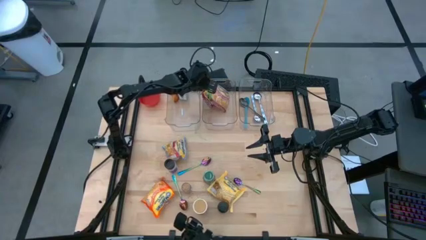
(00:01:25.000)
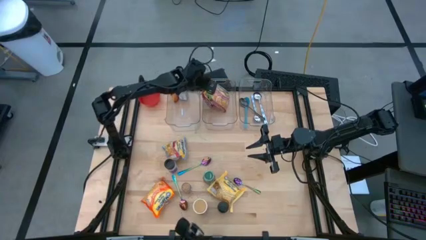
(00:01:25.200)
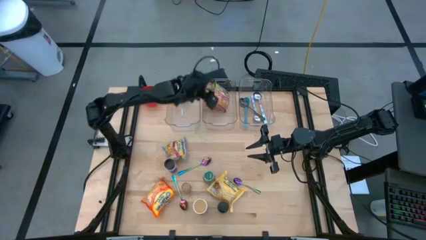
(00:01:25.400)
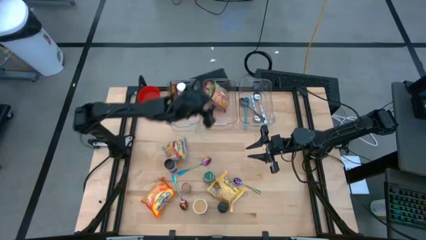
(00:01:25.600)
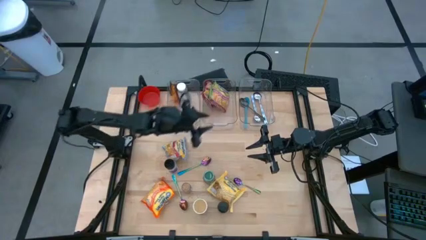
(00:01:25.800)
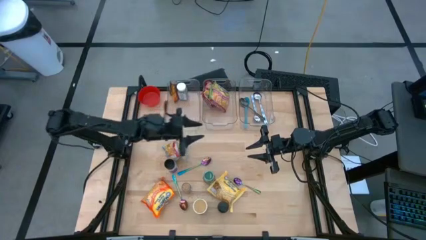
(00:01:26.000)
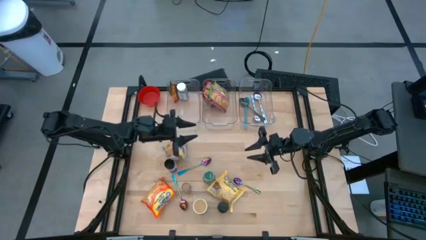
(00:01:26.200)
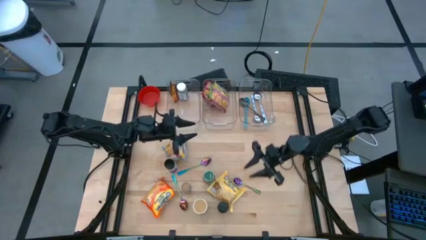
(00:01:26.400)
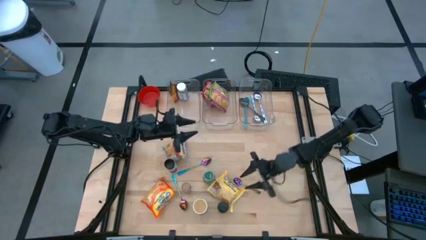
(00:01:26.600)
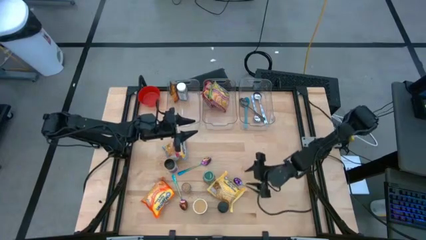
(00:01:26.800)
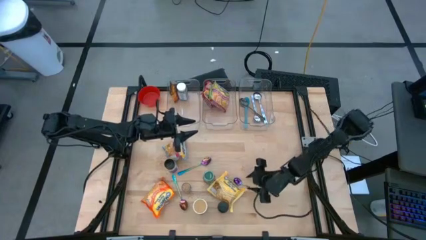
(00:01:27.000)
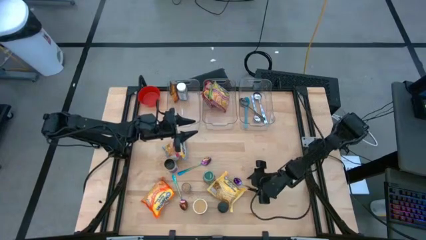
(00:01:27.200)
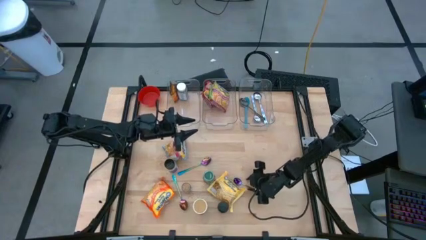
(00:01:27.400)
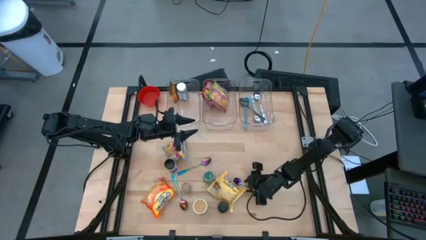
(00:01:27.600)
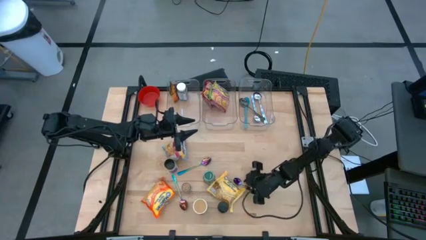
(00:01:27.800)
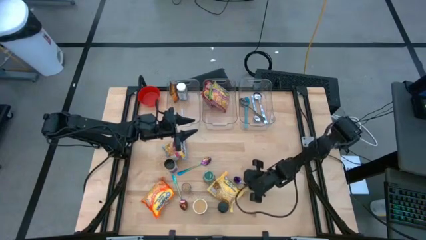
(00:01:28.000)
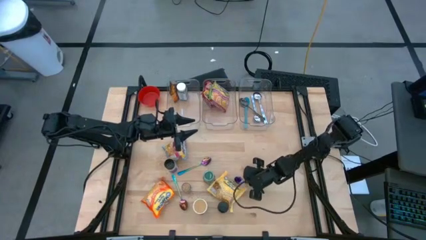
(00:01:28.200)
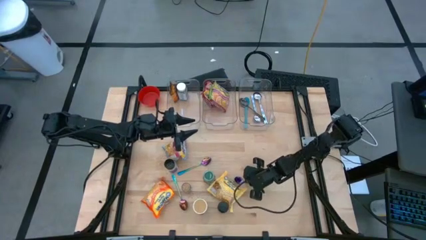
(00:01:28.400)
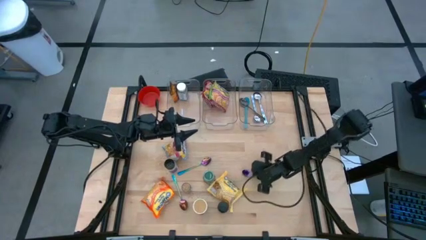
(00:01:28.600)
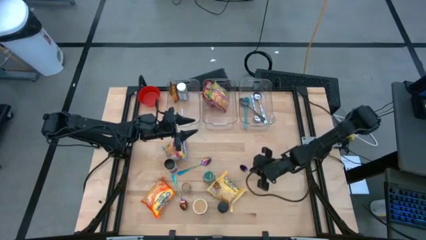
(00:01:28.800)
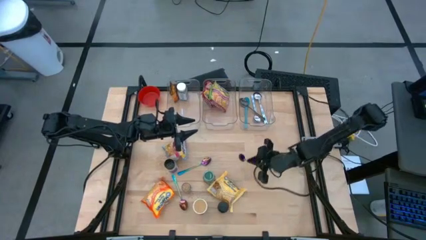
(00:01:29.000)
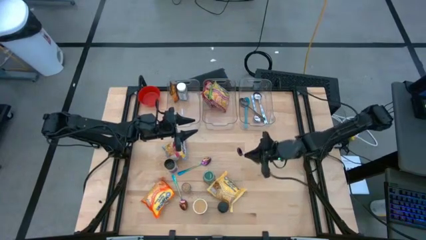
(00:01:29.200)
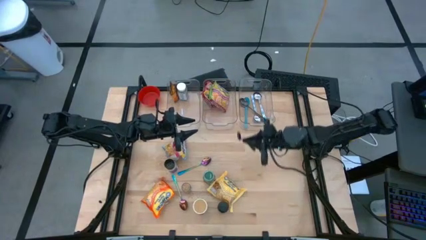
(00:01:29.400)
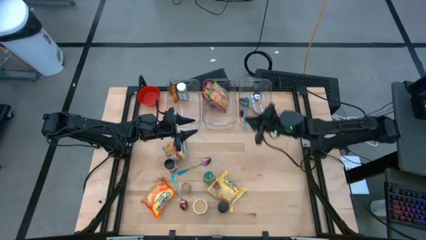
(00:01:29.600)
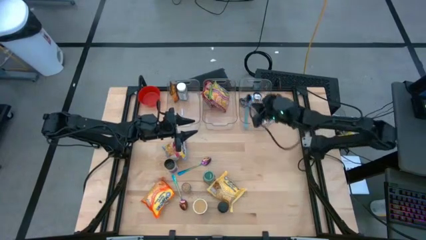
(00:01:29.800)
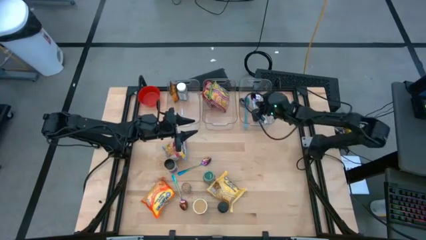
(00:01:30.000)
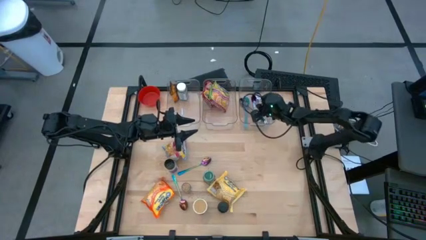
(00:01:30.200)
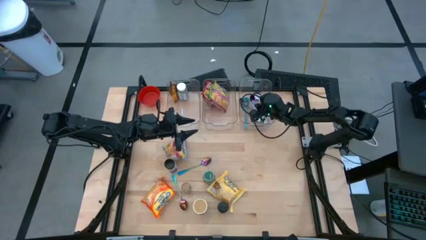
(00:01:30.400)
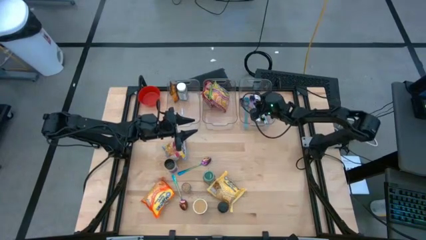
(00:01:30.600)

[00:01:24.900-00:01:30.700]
Task: Pick & Place Food Item
Put the right blue spoon into the right transparent bin

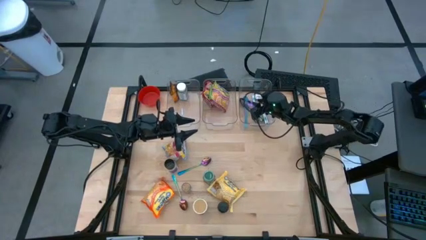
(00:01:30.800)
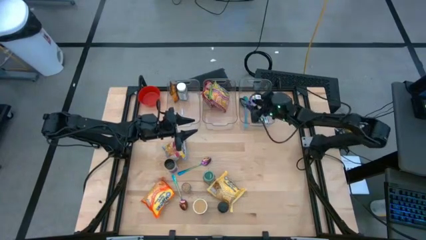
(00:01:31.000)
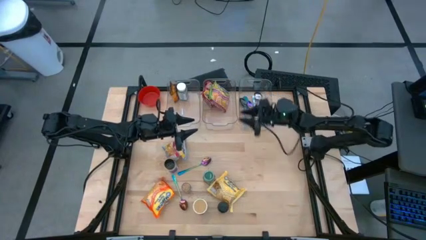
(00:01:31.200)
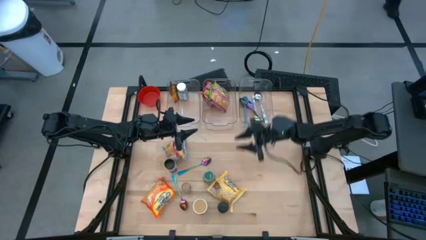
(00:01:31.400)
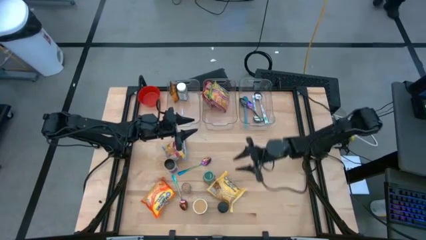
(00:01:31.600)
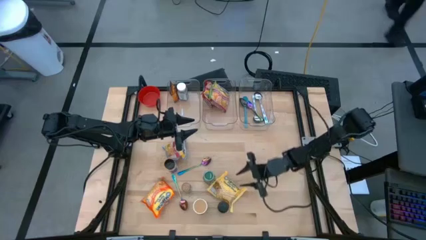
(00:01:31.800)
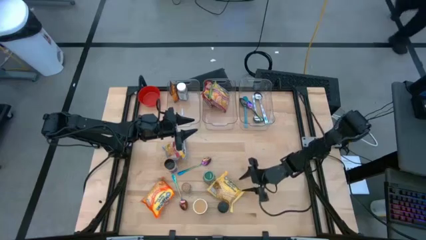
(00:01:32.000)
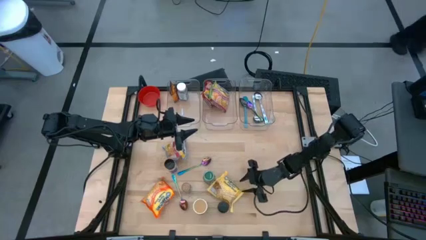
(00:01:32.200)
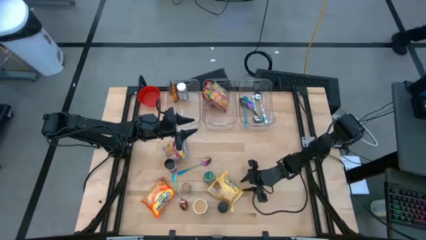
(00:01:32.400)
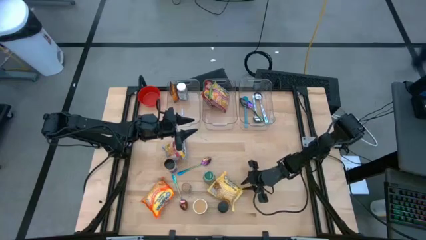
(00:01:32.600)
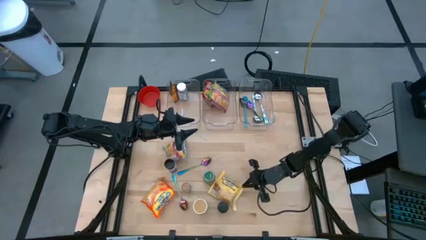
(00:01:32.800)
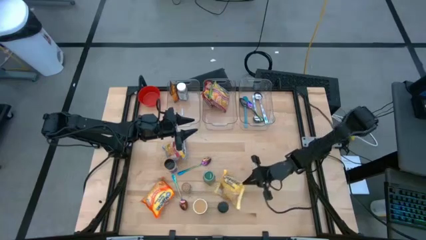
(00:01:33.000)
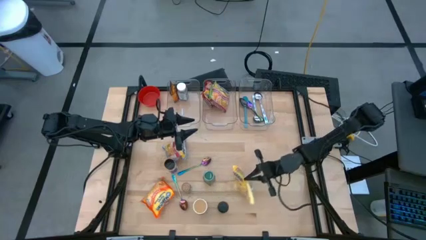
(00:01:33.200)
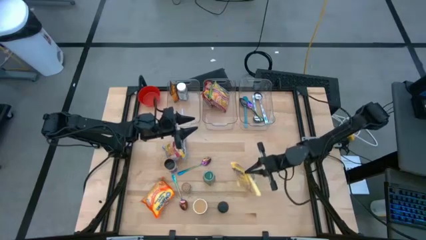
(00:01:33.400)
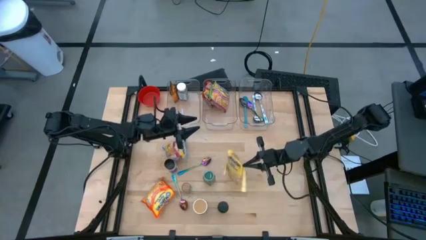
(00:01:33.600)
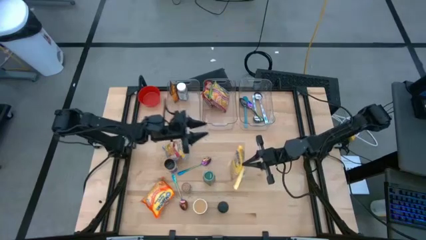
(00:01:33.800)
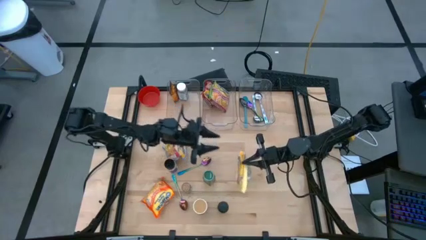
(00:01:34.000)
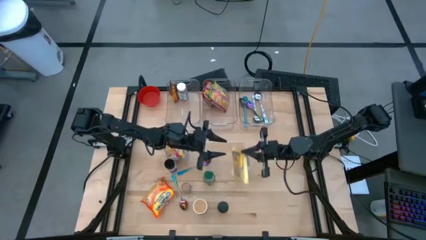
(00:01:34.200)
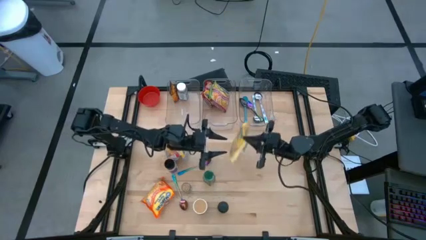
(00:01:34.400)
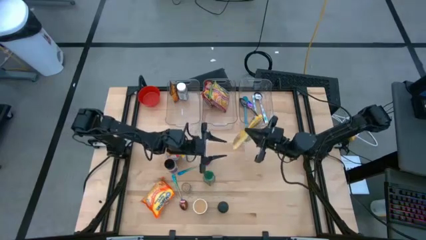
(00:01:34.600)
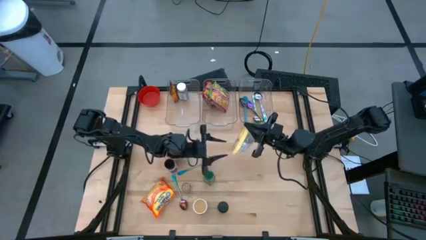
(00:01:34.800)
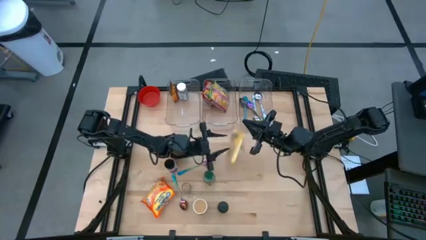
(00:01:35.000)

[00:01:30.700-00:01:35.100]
Put the yellow noodle pack into the middle transparent bin

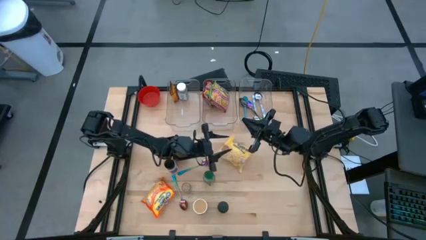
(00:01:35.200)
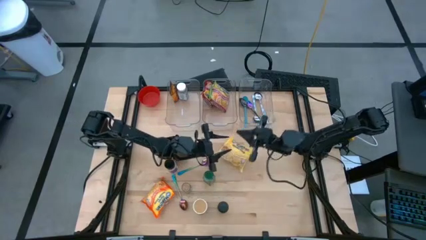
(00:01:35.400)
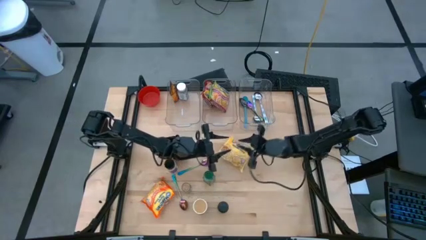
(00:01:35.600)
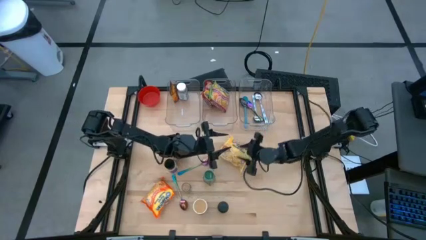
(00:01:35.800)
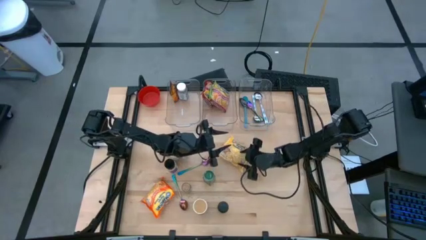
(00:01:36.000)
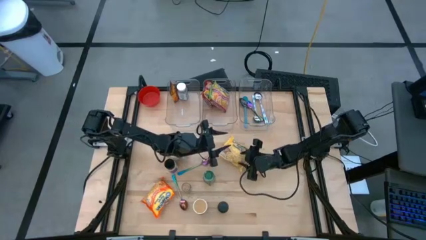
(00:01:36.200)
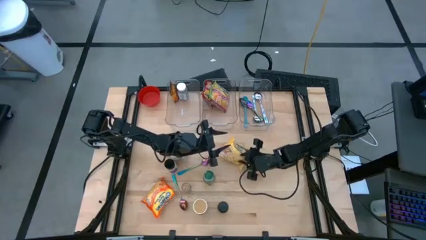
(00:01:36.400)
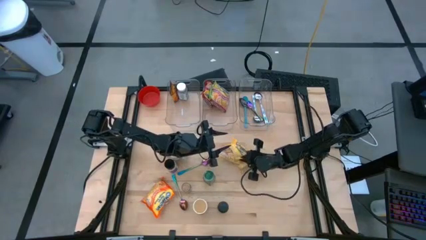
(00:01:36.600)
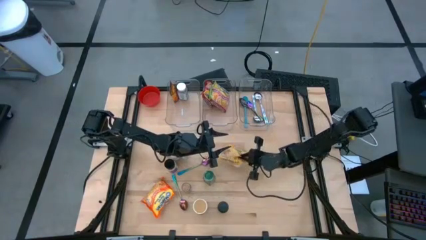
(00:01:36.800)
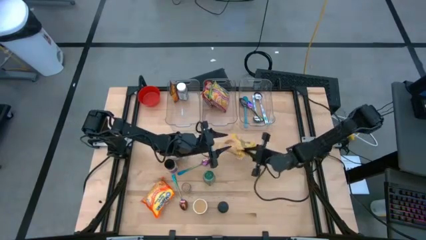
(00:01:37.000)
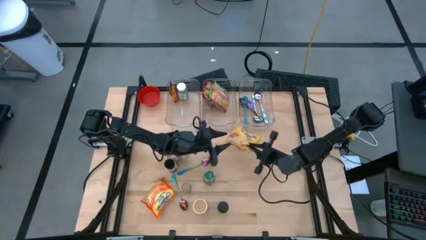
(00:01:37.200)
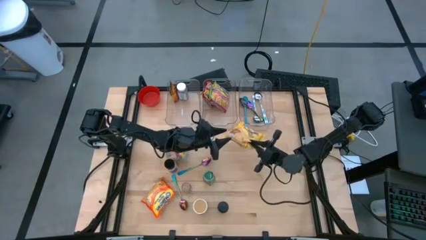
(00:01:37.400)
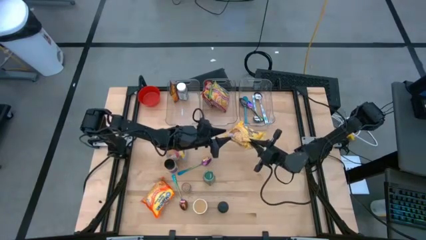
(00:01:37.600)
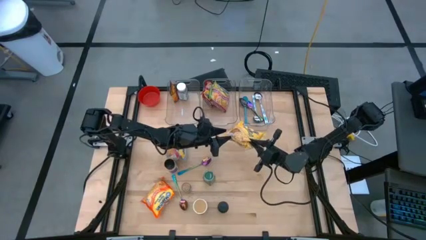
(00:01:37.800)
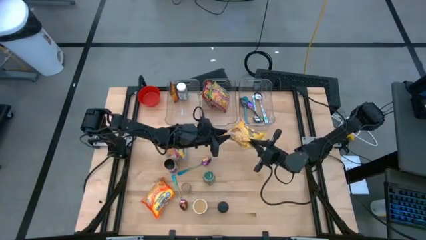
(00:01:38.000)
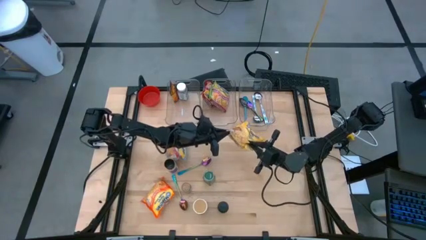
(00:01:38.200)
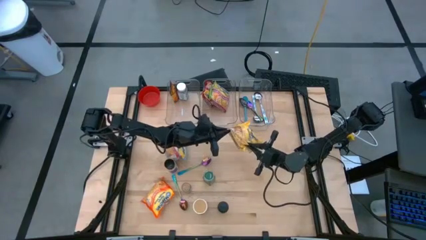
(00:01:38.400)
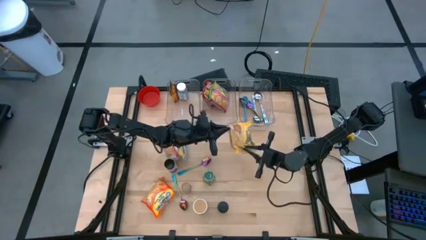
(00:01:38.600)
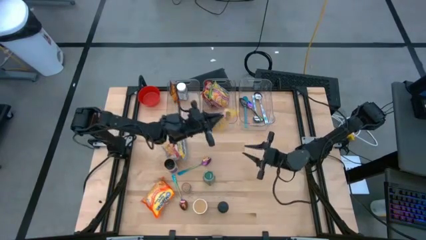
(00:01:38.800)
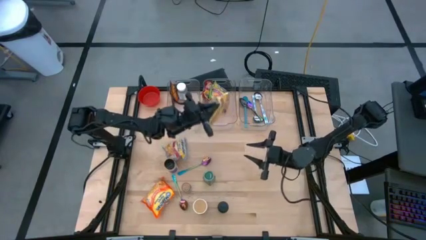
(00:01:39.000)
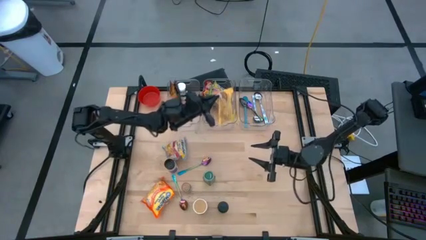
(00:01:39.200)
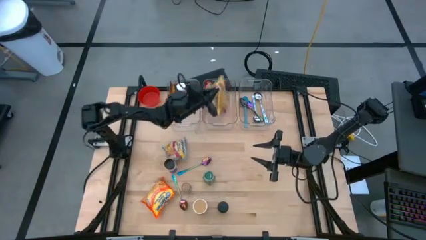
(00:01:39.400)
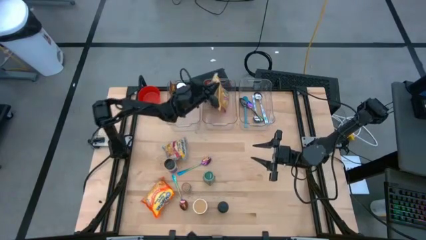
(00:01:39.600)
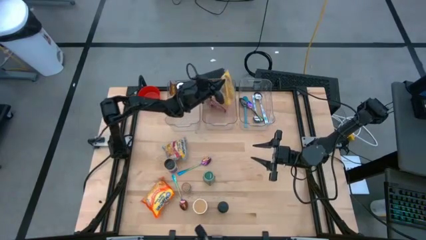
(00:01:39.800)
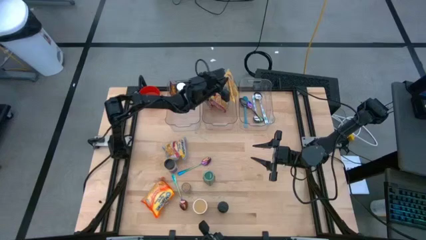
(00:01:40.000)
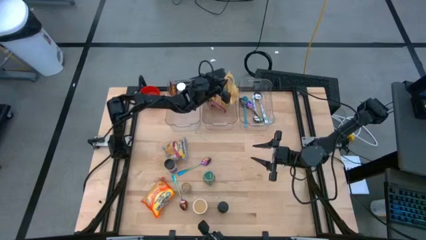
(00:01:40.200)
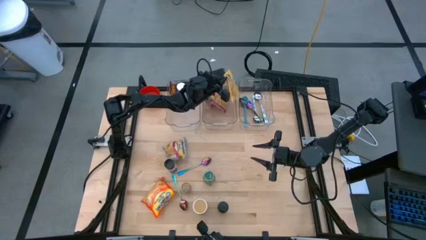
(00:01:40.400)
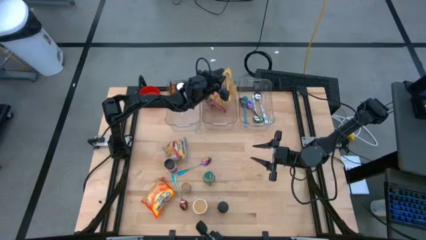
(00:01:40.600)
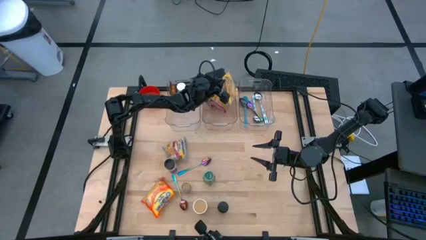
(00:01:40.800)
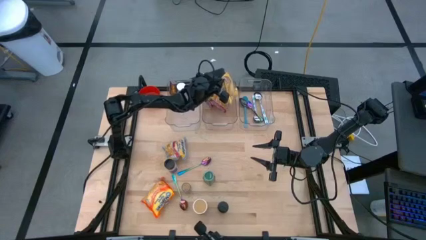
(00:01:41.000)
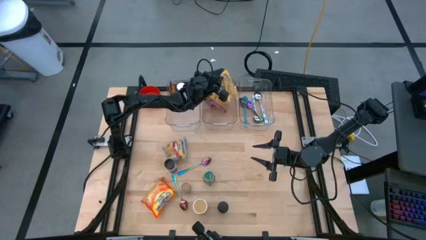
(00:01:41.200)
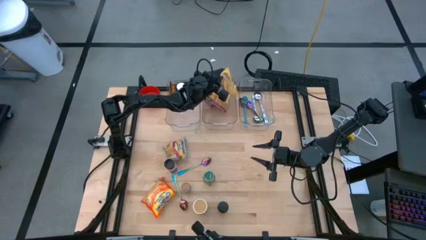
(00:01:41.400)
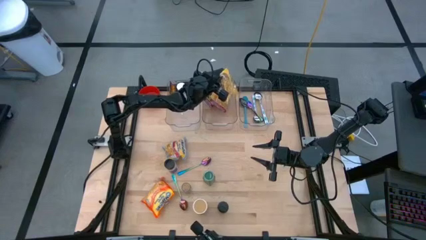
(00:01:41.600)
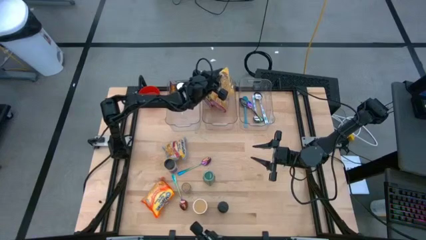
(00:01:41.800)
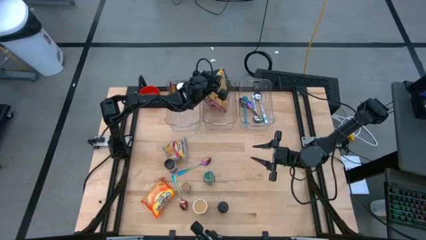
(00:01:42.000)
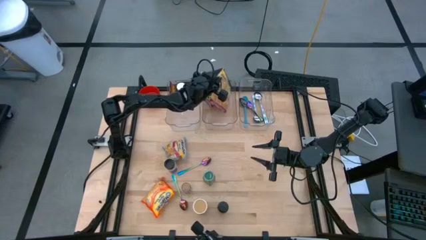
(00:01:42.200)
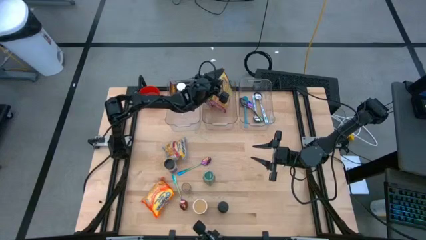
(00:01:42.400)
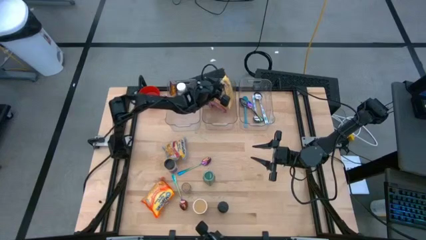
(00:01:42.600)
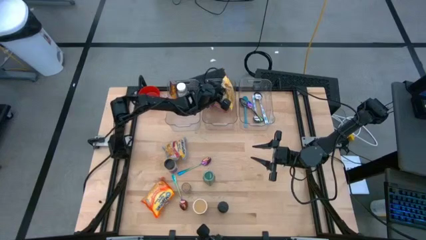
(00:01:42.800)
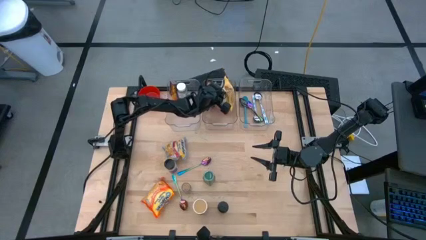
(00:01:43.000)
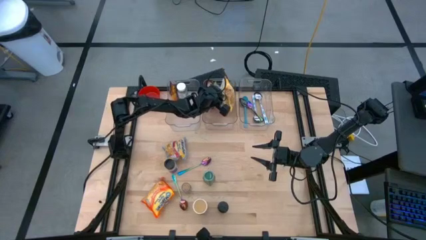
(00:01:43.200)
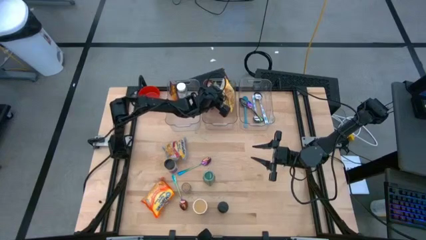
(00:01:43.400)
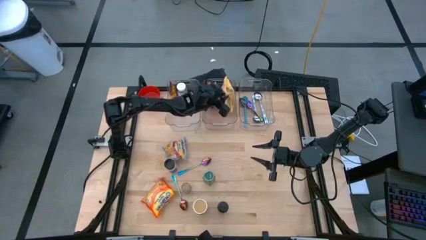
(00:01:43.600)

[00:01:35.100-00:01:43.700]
Put the yellow noodle pack into the middle transparent bin
